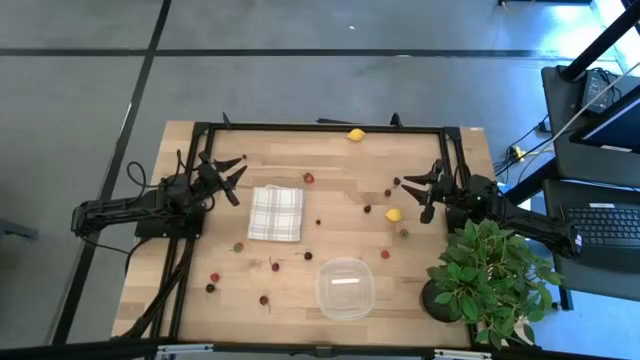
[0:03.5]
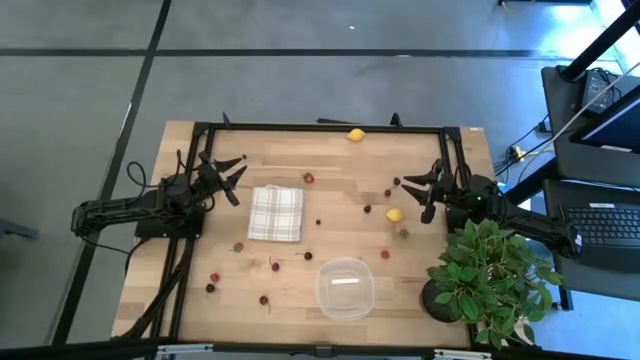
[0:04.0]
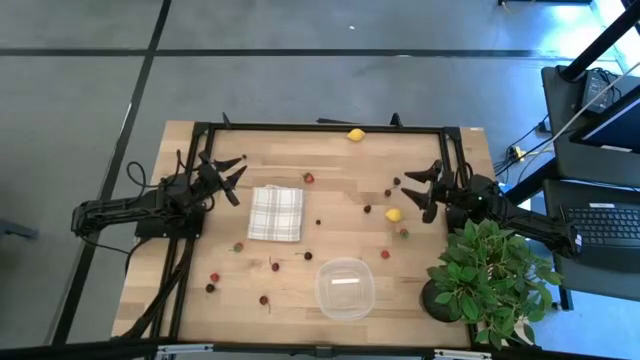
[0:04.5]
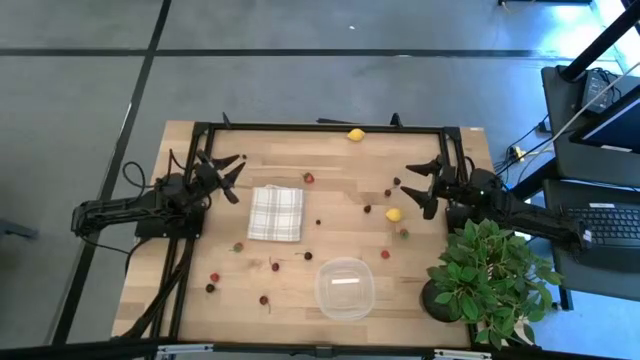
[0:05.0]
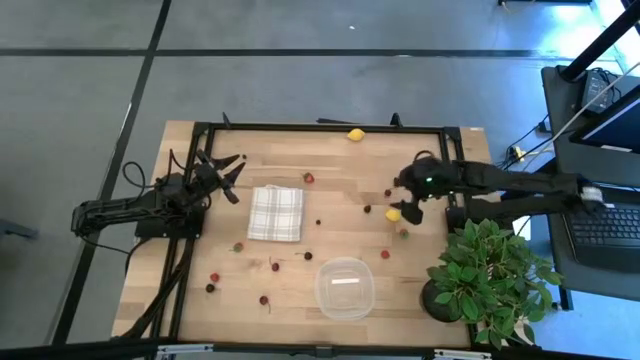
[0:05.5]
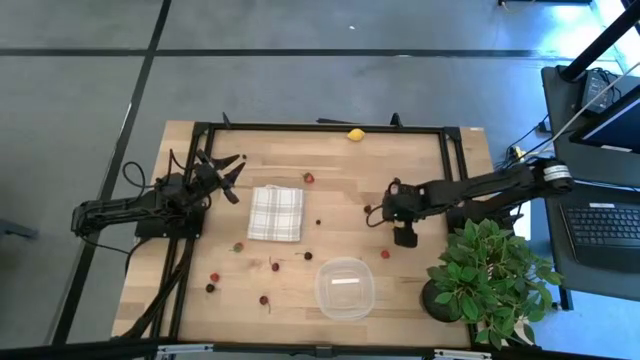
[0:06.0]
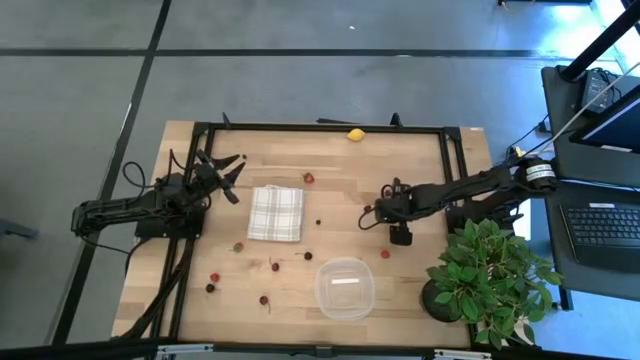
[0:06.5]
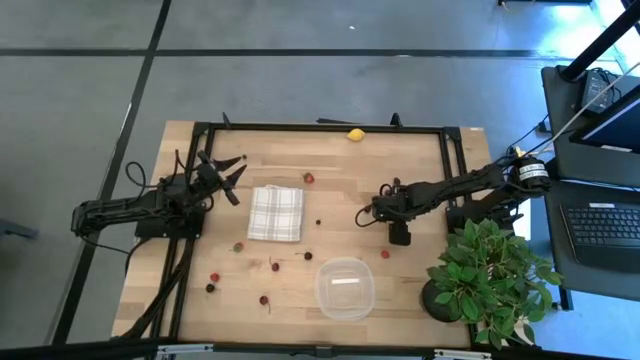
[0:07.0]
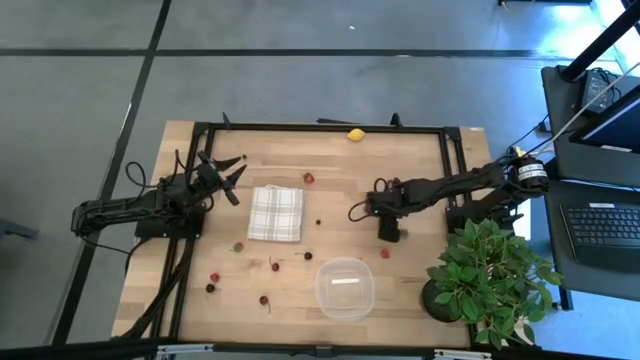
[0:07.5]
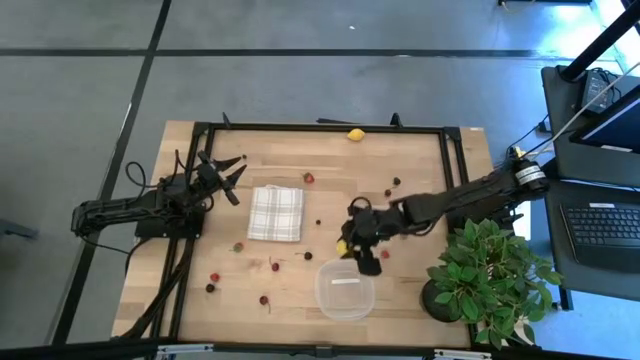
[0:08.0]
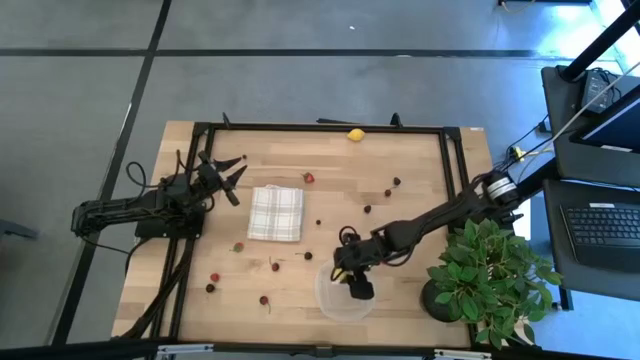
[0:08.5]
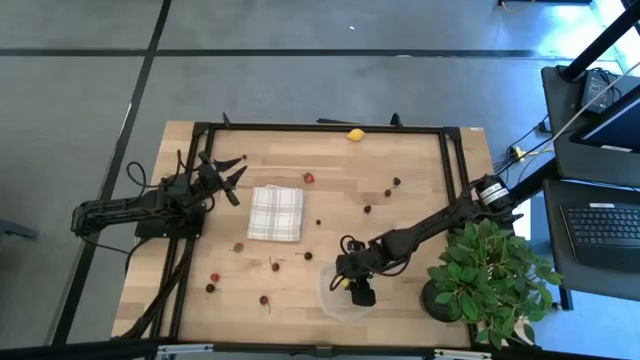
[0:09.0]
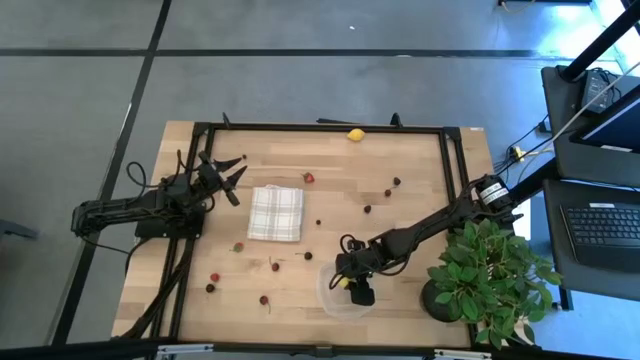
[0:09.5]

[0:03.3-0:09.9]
Task: Pick and placing Produce into tupperware
Put the bottom lemon into the transparent container

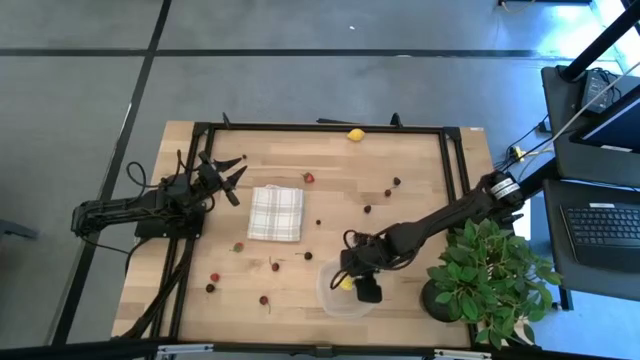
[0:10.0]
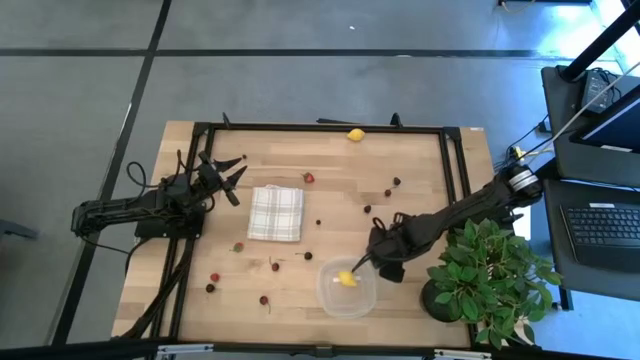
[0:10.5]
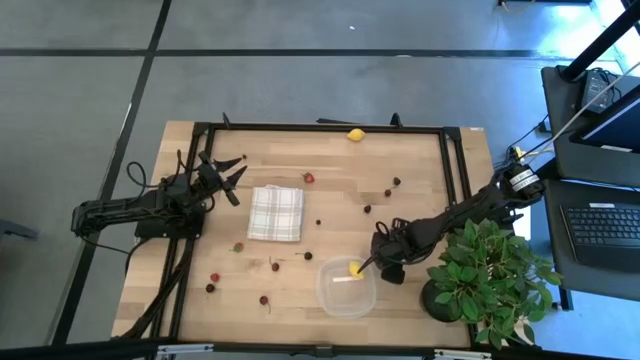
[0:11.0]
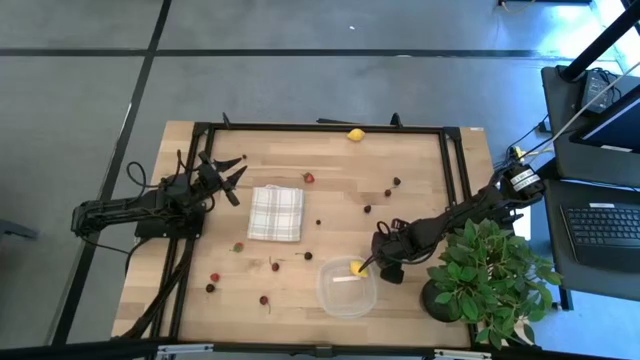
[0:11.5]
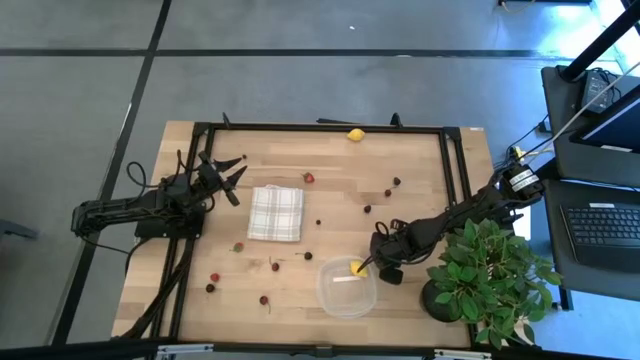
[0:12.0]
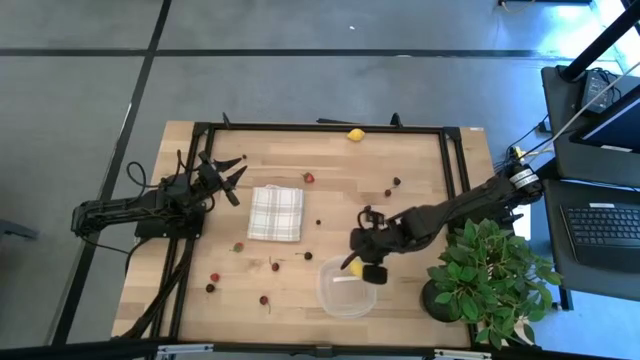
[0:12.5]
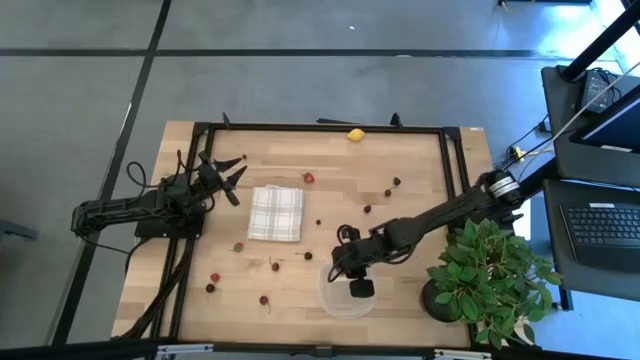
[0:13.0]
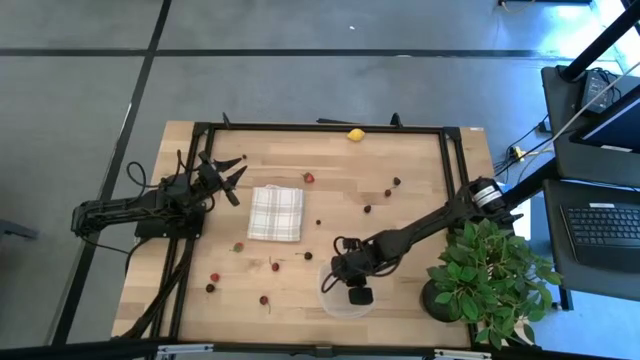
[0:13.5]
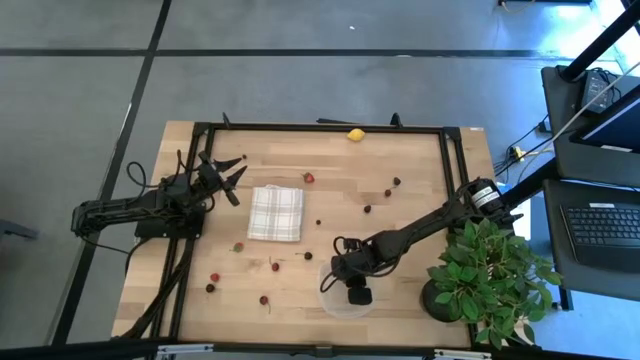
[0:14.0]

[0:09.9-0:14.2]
Put the right raspberry into the transparent container

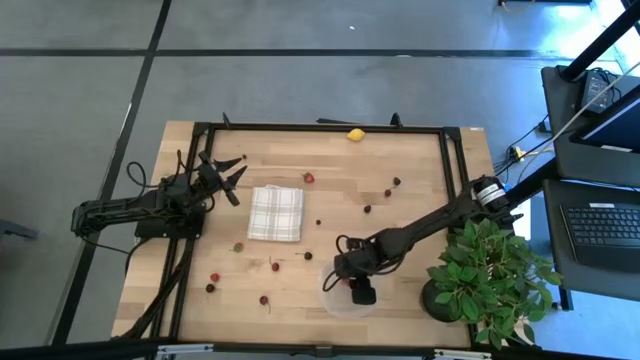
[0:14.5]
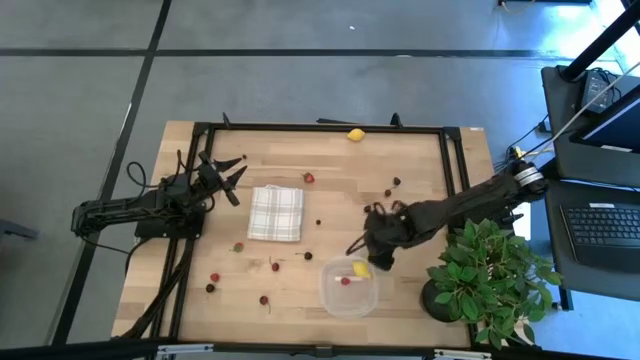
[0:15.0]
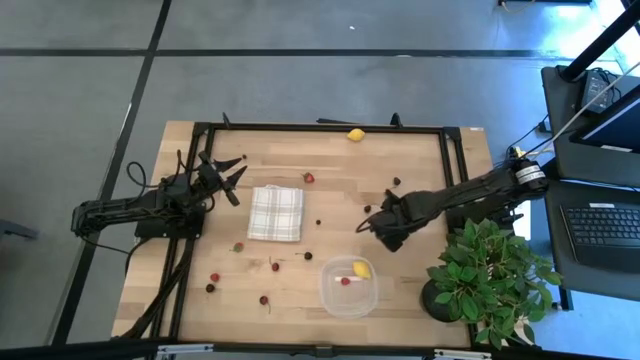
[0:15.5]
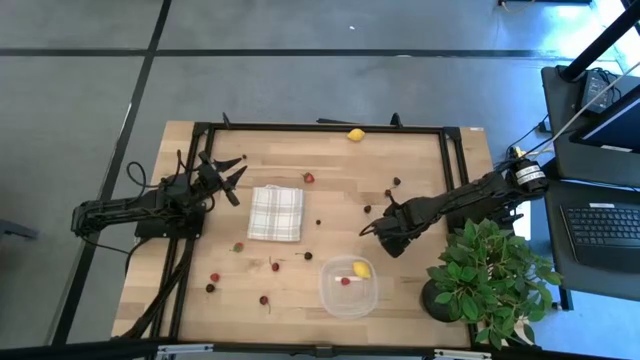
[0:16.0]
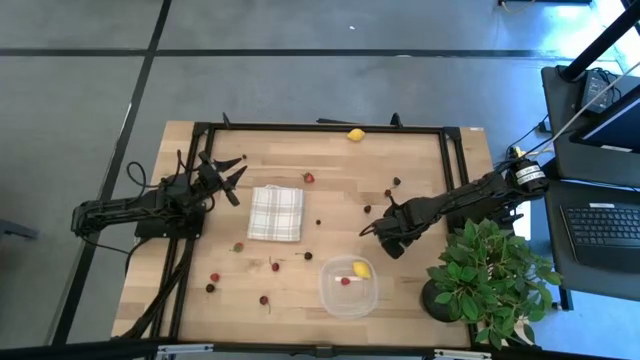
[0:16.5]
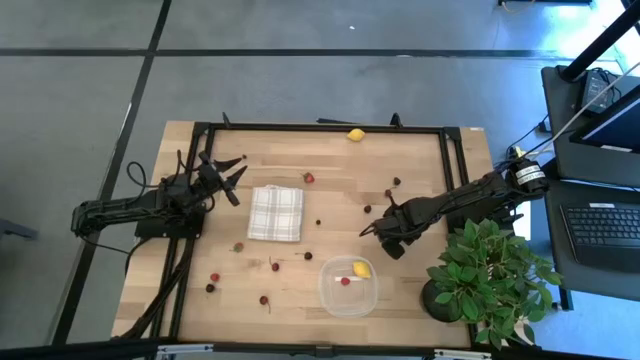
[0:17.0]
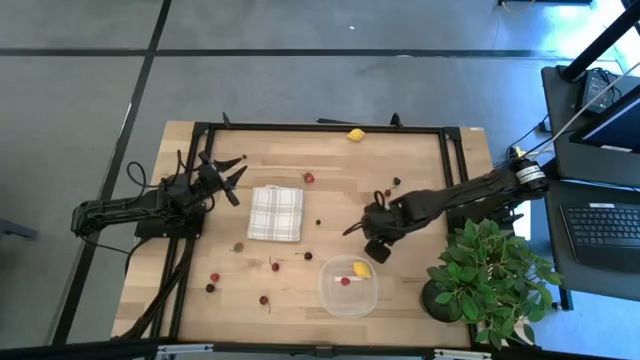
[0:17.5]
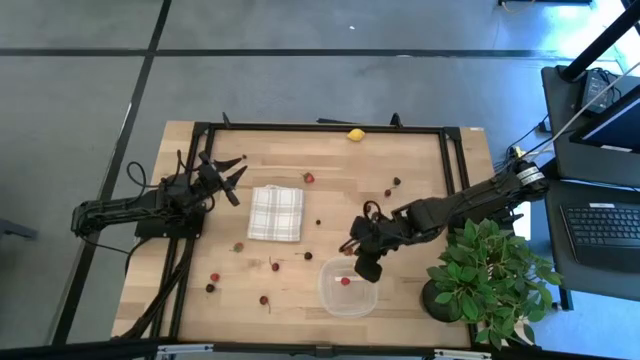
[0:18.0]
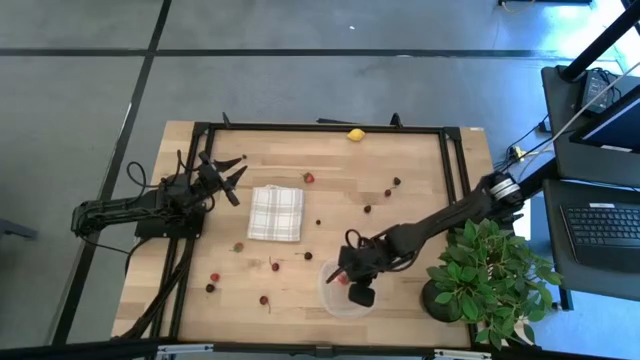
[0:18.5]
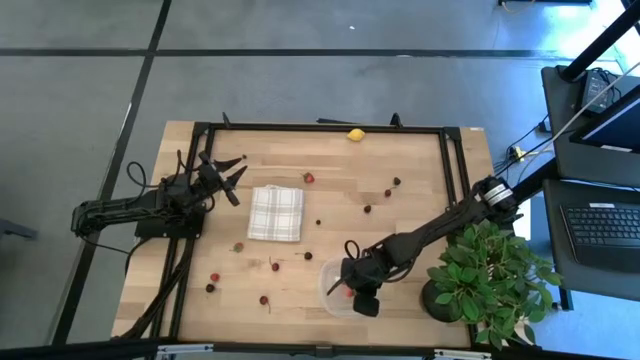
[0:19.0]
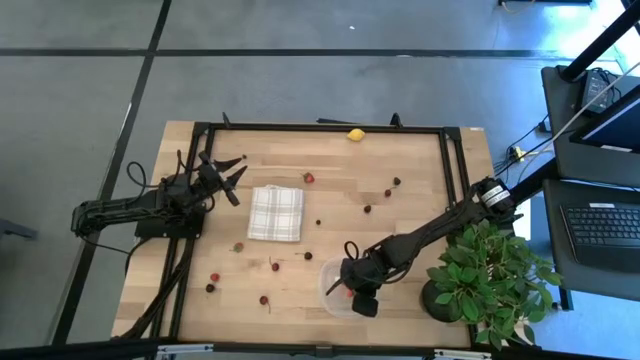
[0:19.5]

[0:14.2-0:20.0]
Put the bottom right strawberry into the transparent container

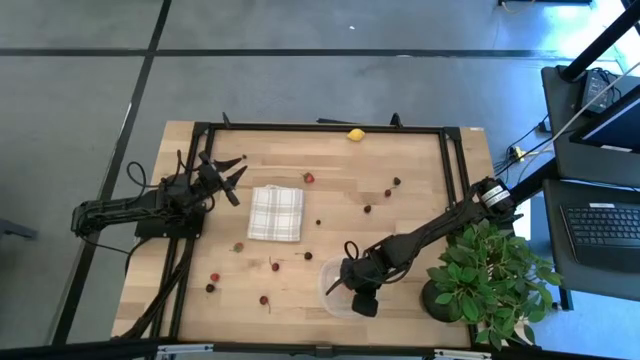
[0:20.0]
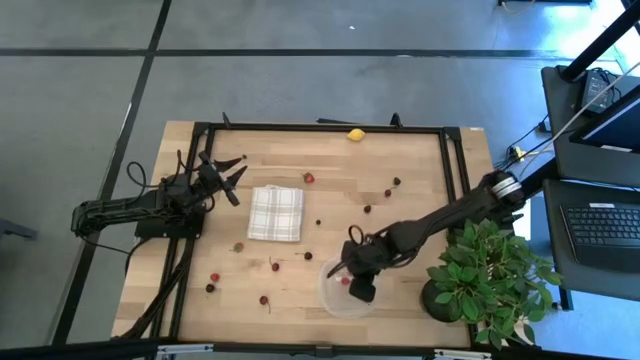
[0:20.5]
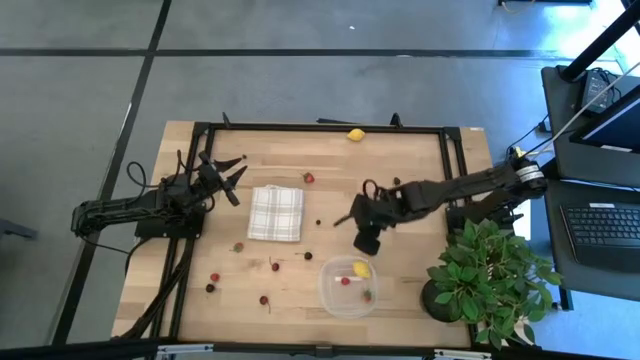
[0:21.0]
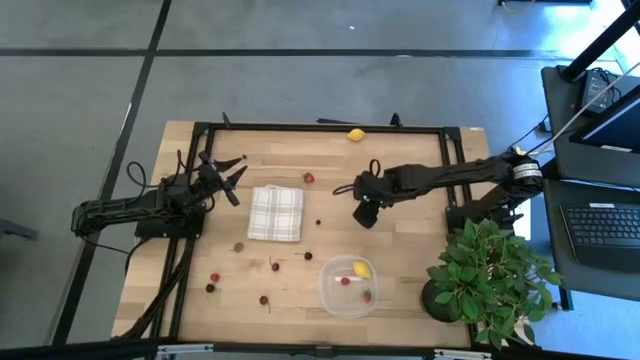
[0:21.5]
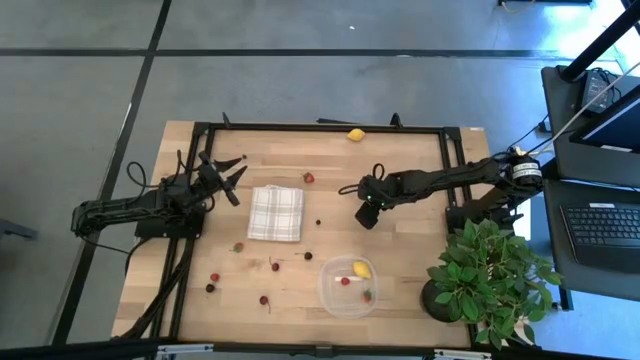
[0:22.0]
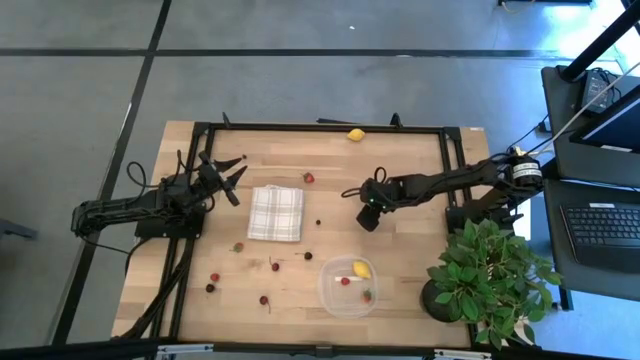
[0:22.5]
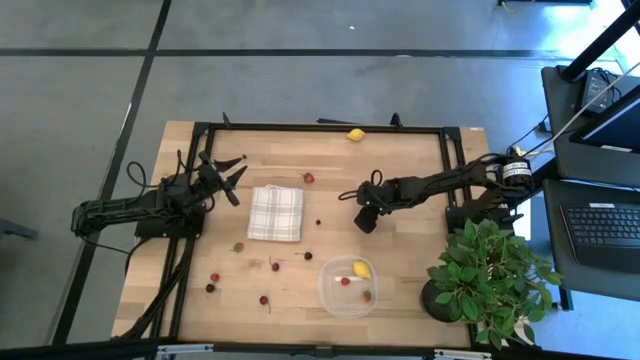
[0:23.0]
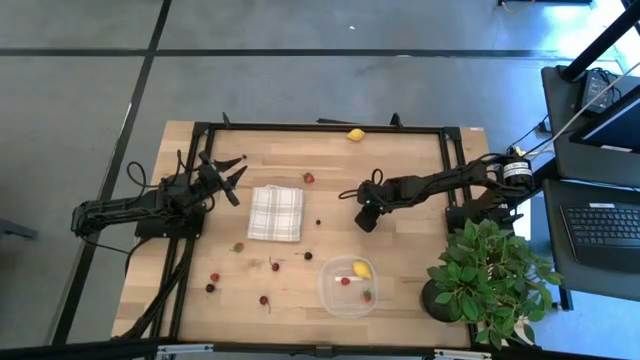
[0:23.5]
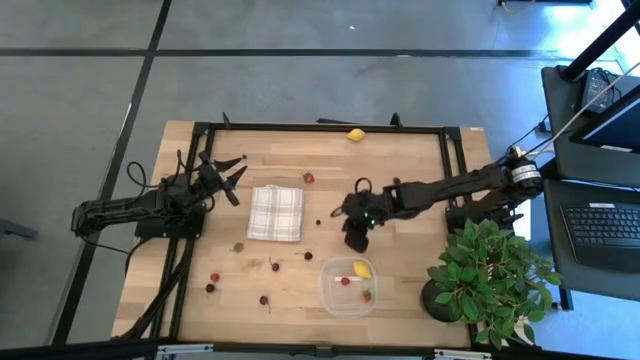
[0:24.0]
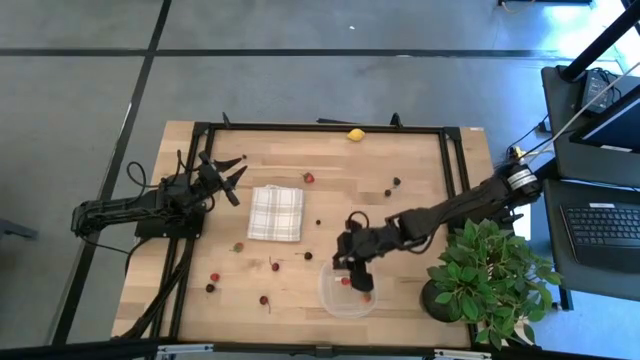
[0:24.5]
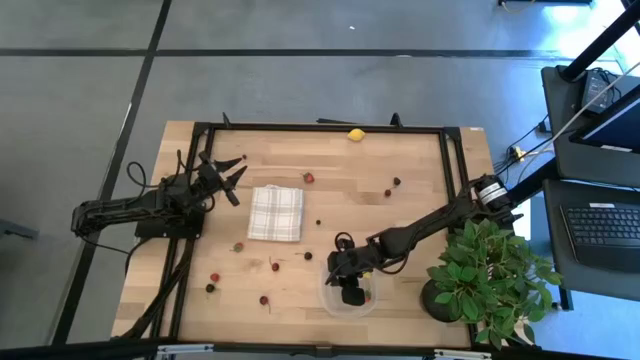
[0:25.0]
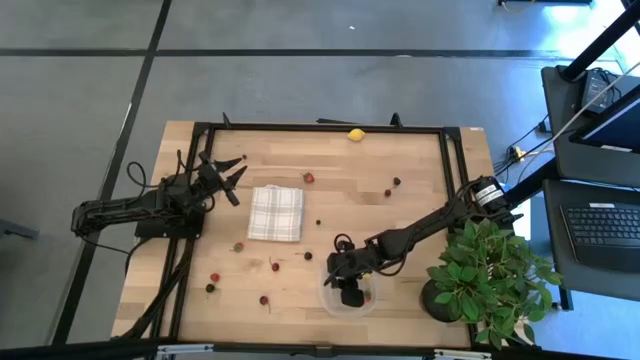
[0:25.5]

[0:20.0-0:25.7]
Put the bottom blackberry into the transparent container
